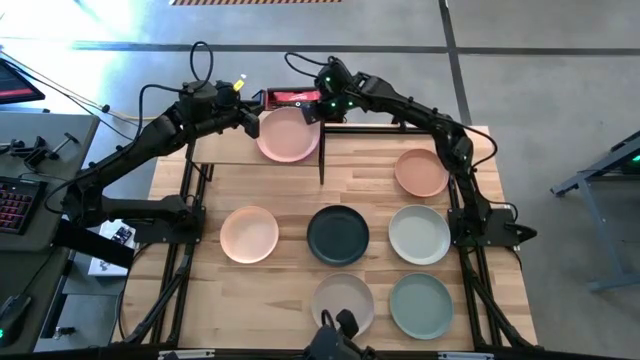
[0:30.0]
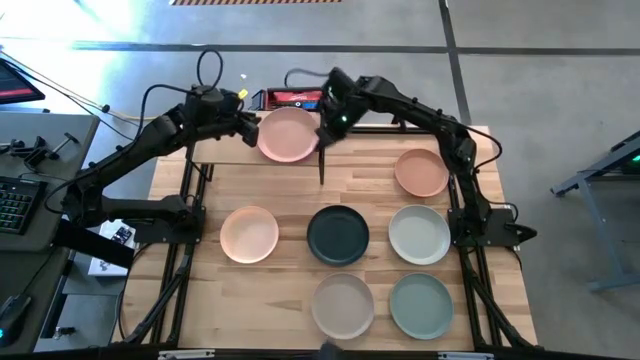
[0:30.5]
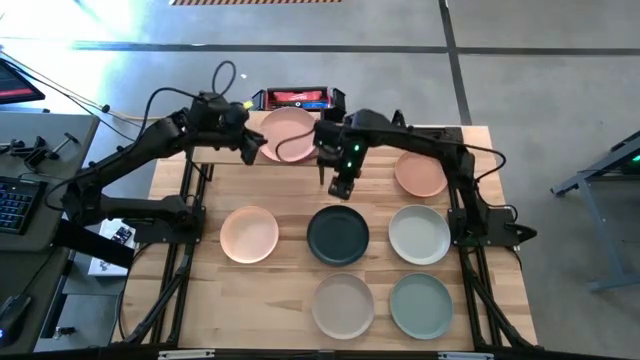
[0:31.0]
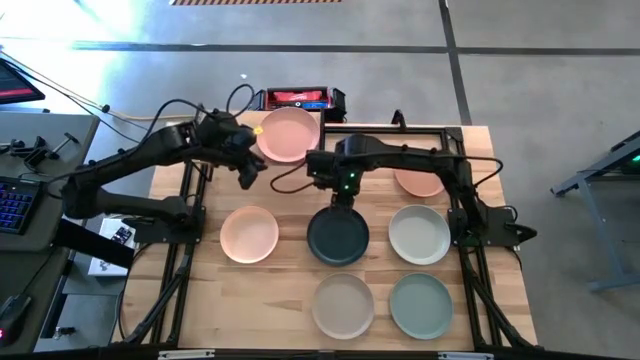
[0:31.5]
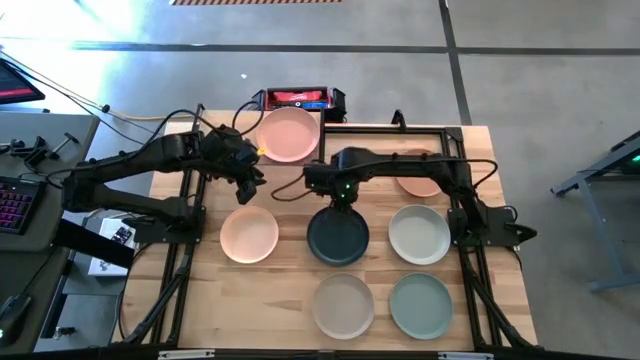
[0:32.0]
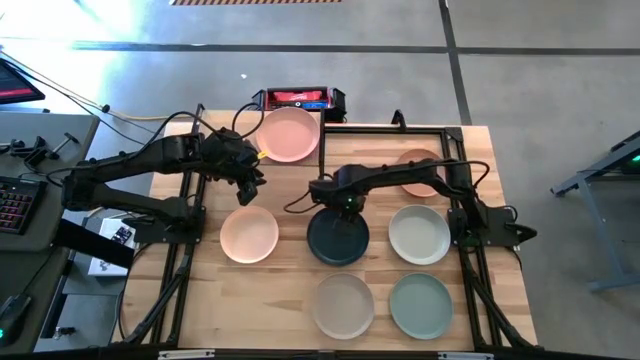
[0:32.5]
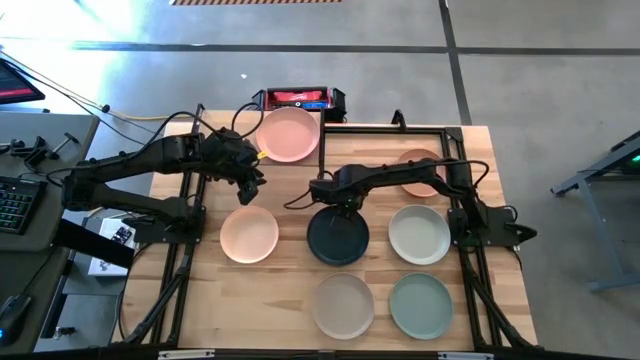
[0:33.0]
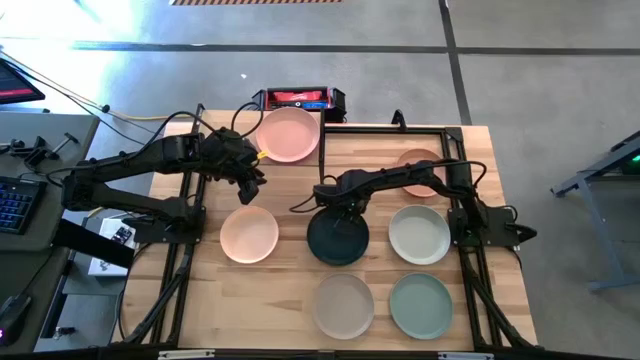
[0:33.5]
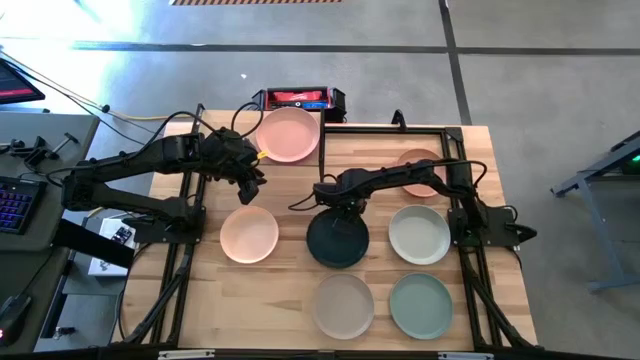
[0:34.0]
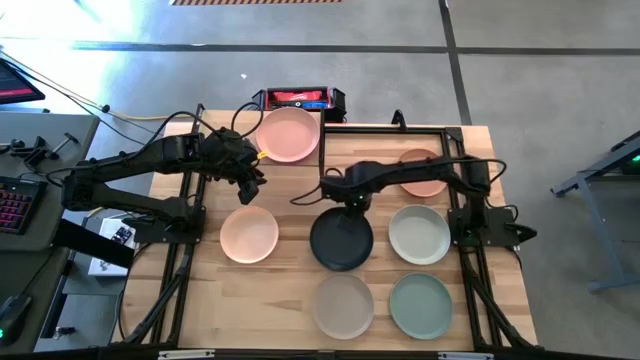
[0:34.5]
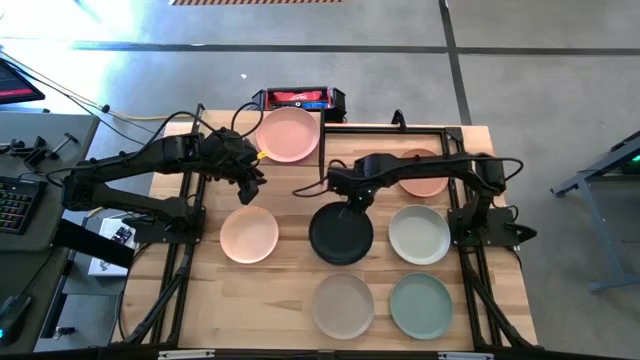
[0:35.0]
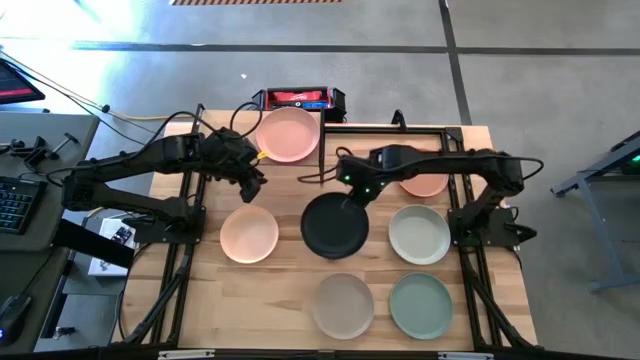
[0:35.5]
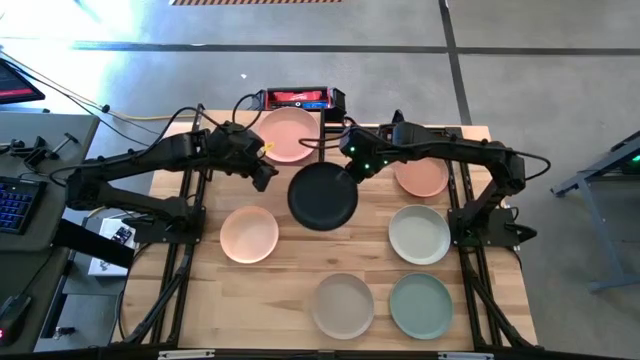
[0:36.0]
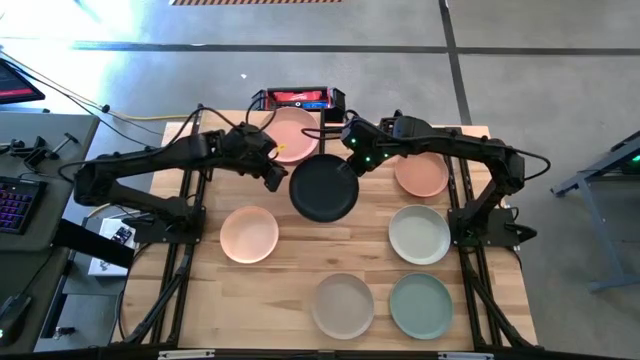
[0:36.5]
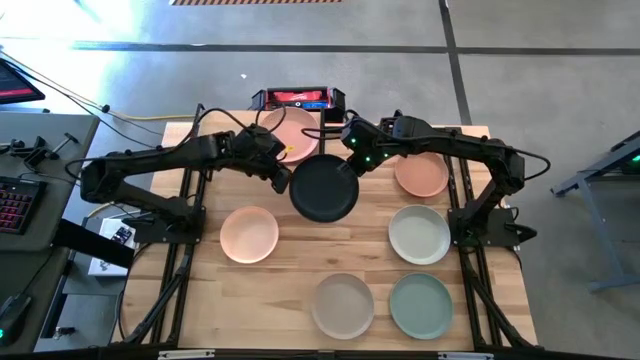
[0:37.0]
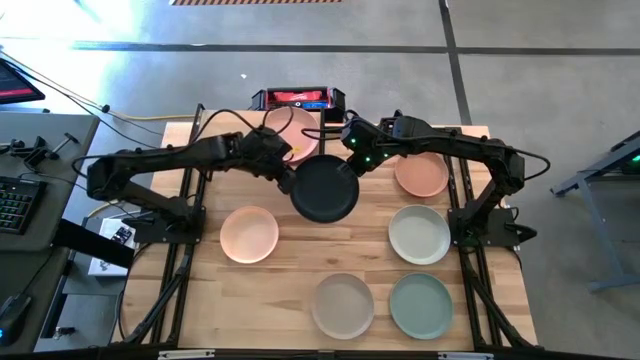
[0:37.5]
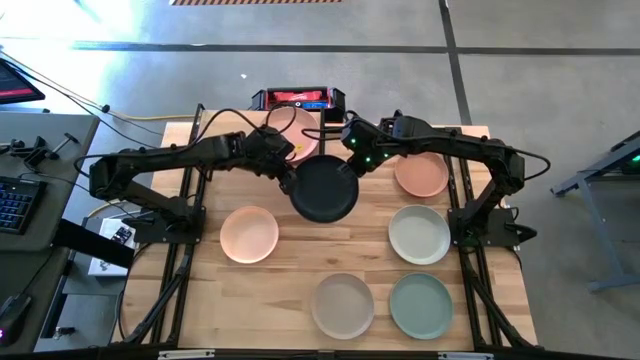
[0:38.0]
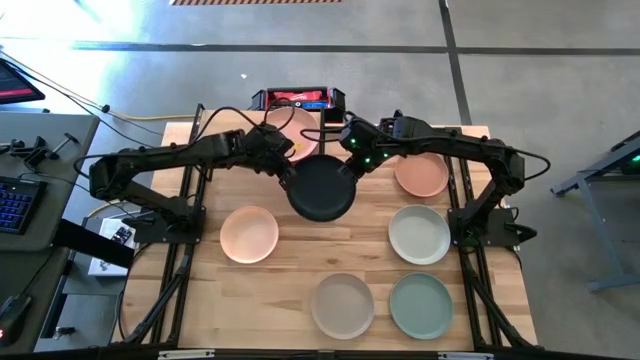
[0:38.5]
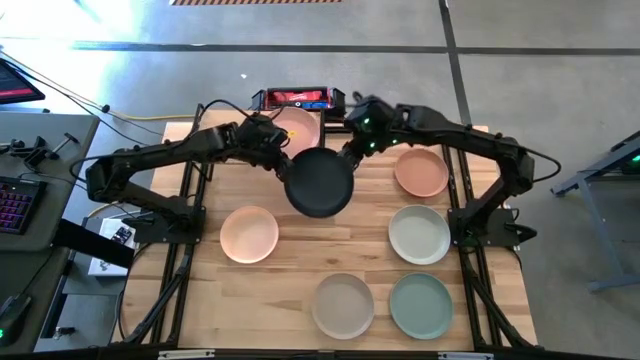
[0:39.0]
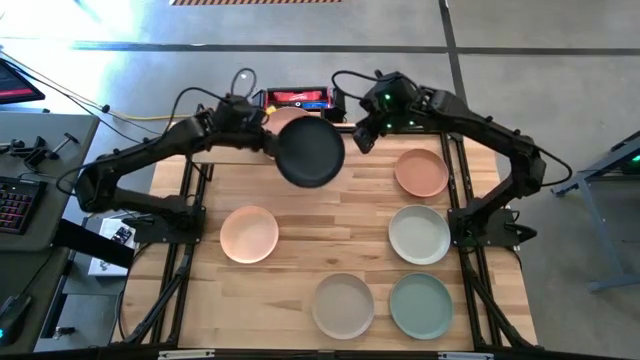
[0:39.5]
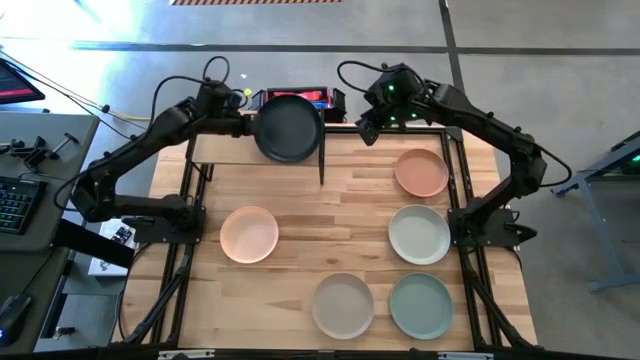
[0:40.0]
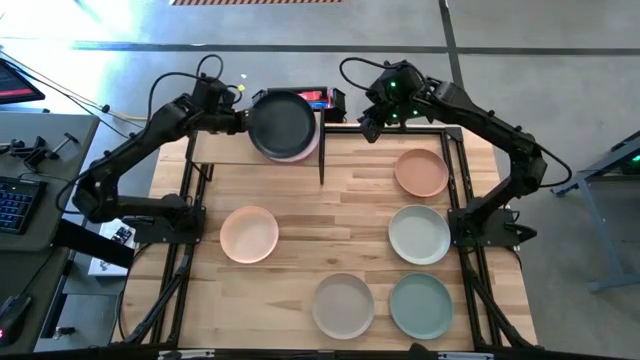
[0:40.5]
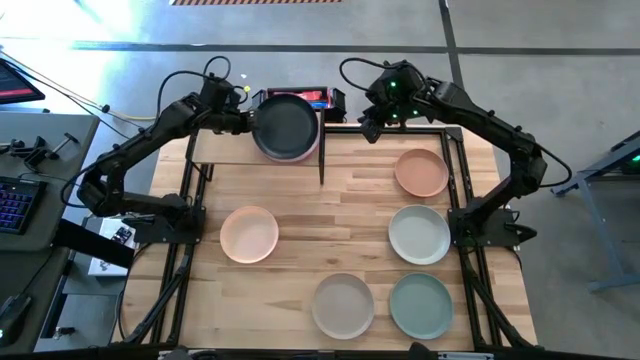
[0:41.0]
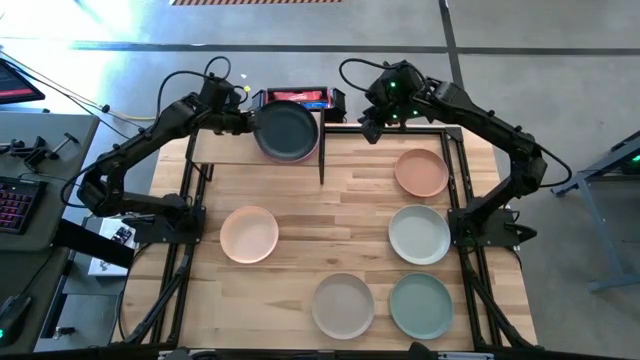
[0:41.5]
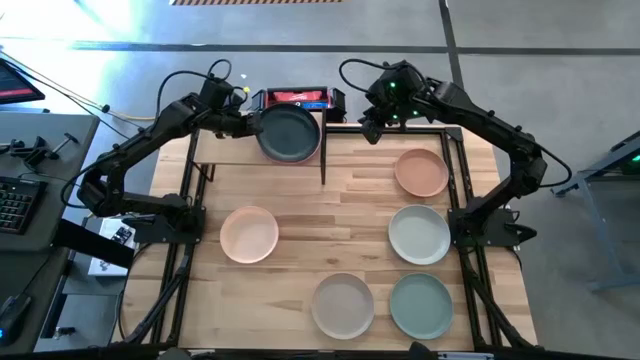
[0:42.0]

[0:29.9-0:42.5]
Task: Place and stack plates onto a shelf
Stack the black plate on top of the brown plate on the shelf

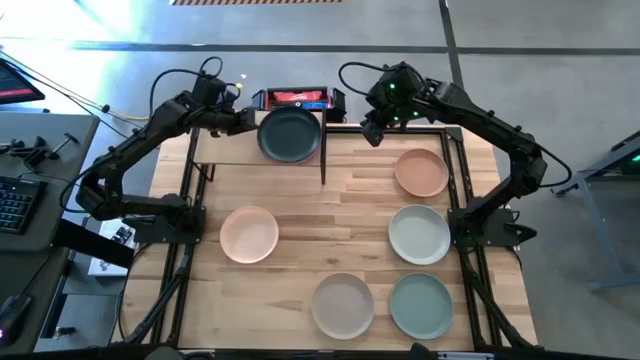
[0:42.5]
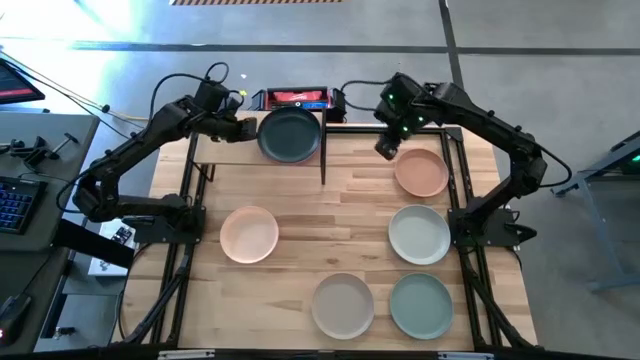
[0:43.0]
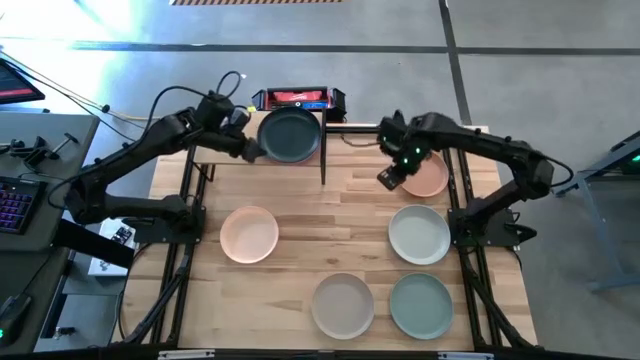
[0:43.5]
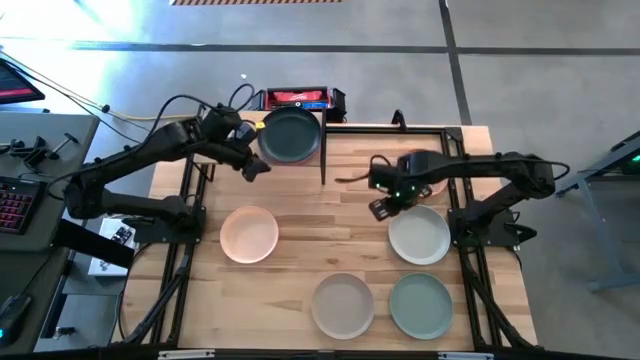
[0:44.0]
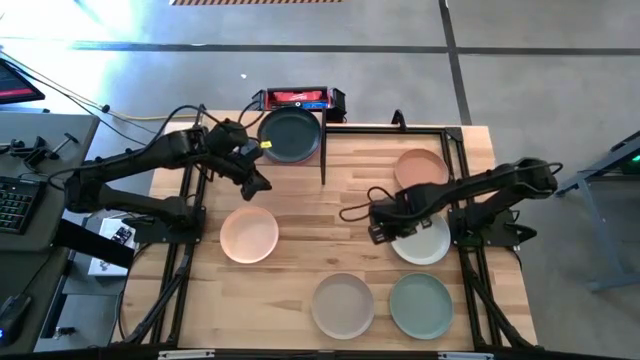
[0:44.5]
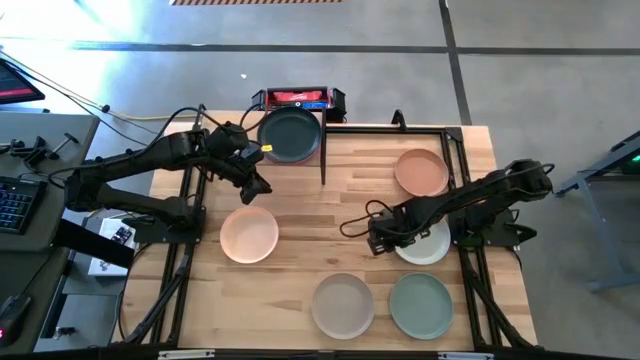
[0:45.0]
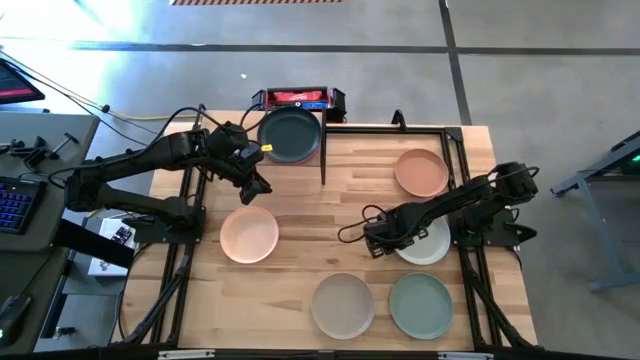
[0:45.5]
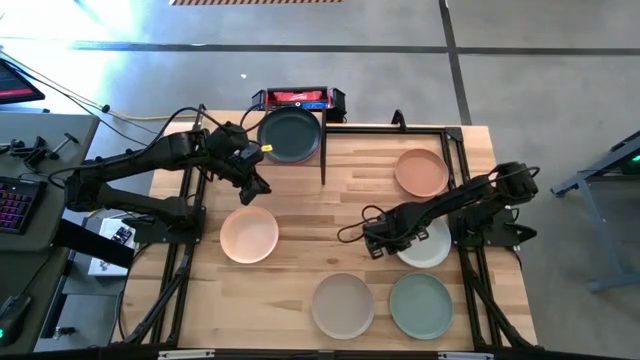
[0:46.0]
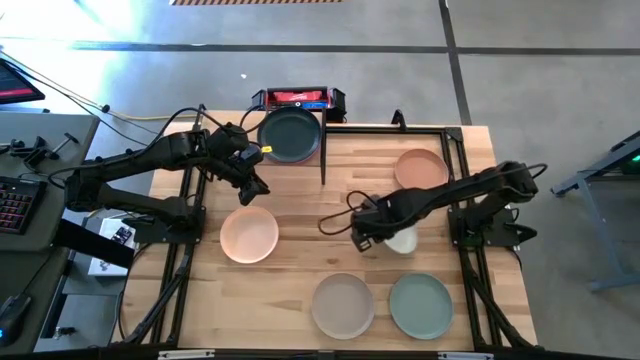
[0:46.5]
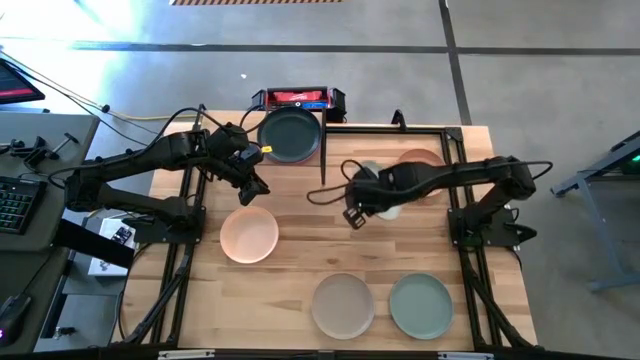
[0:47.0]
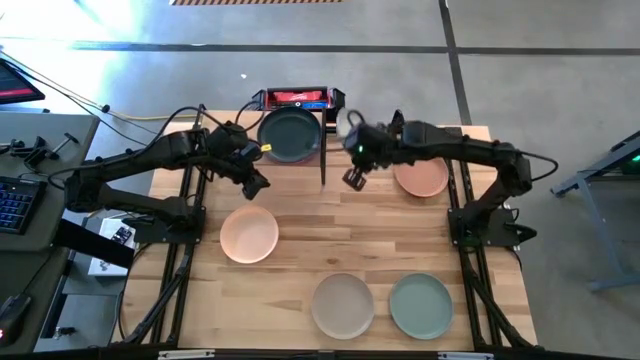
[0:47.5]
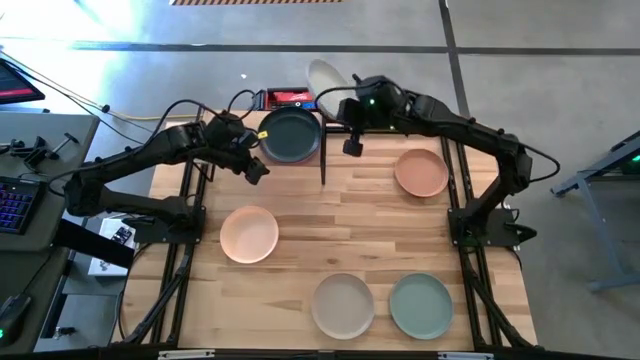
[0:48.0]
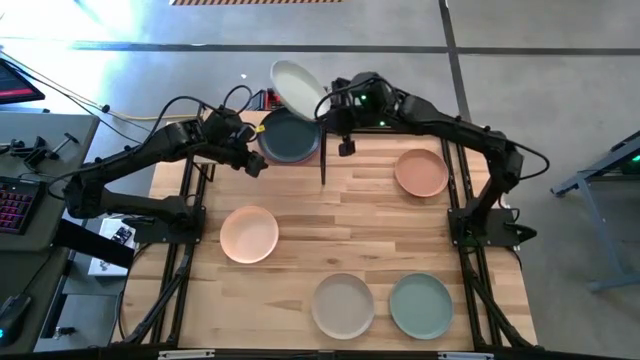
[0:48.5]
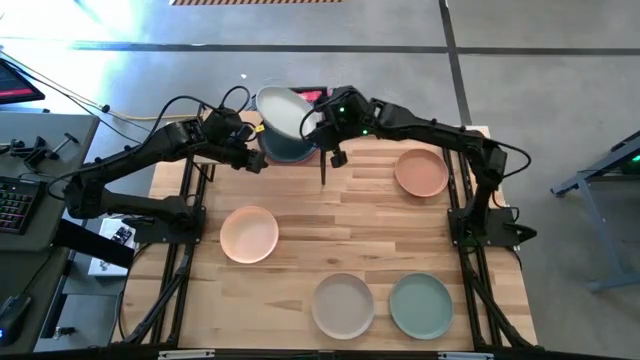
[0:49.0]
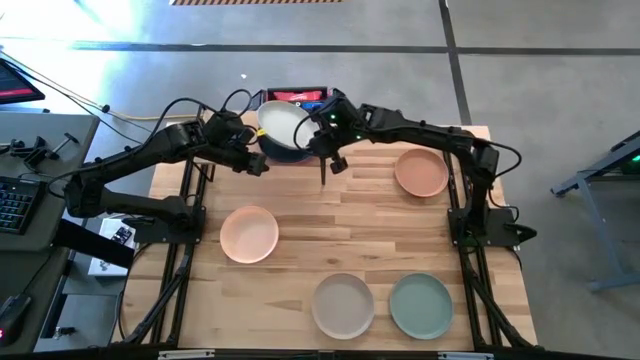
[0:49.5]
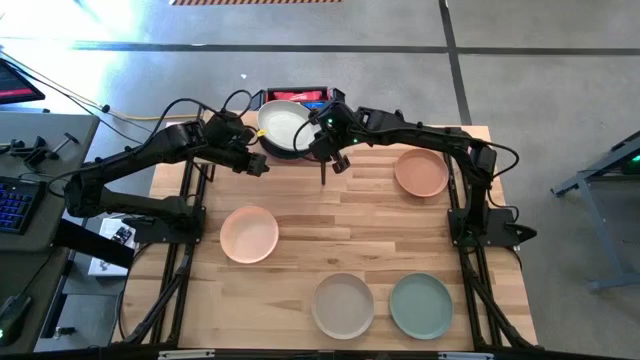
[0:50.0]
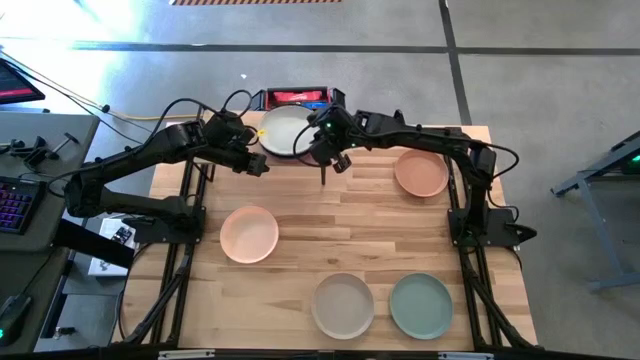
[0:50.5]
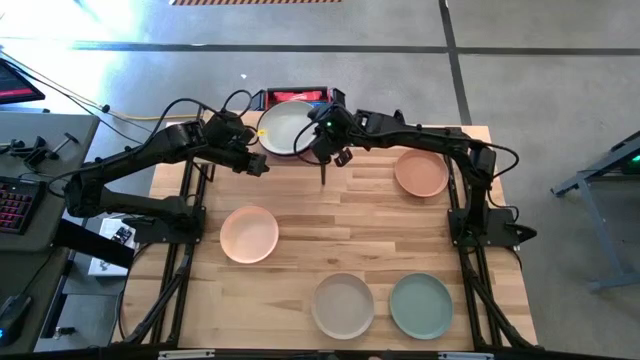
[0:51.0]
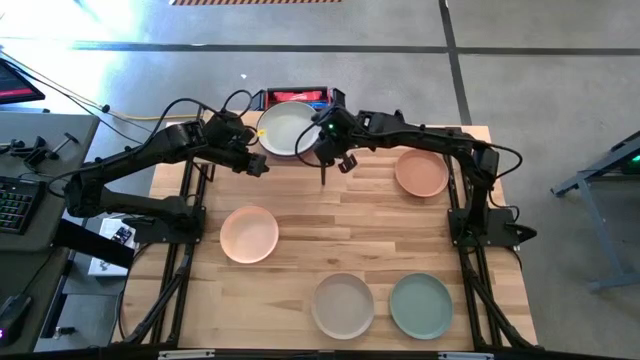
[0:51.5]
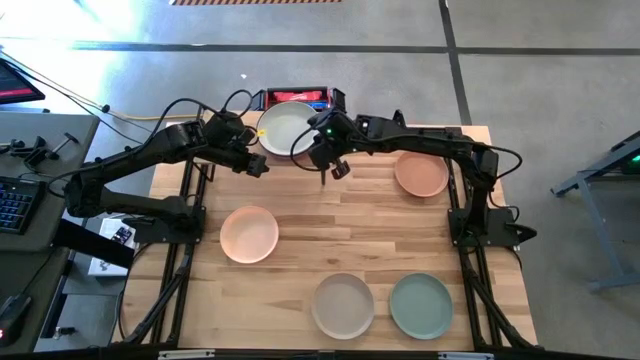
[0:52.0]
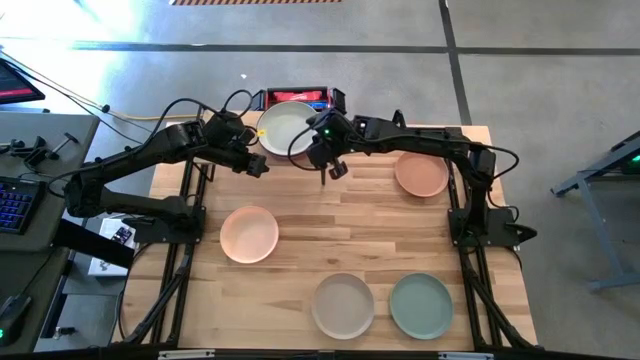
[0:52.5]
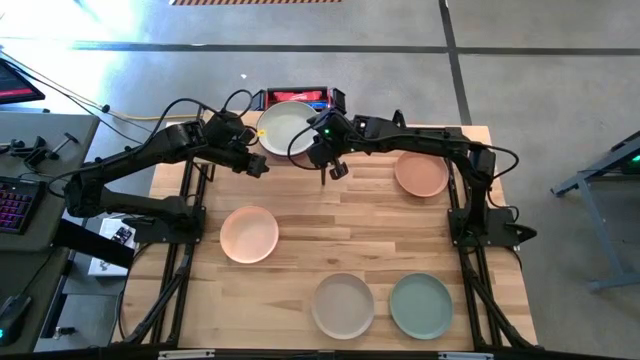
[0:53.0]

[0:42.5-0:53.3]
Stack the gray plate on top of the black plate on the shelf
